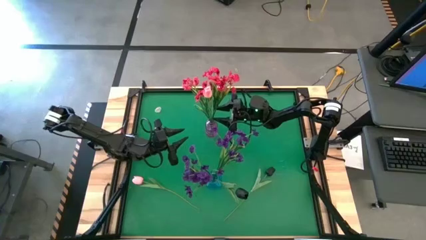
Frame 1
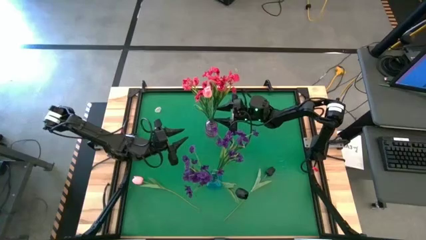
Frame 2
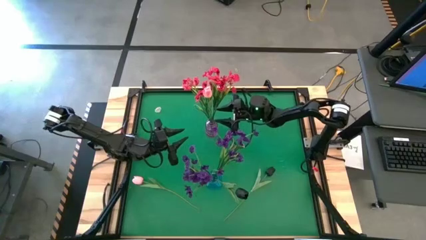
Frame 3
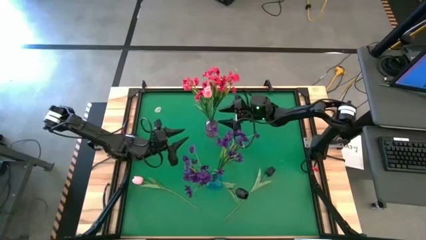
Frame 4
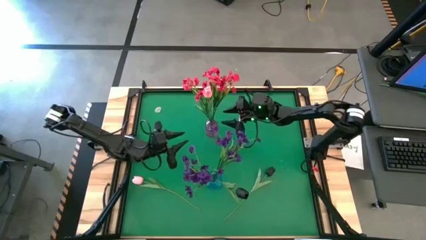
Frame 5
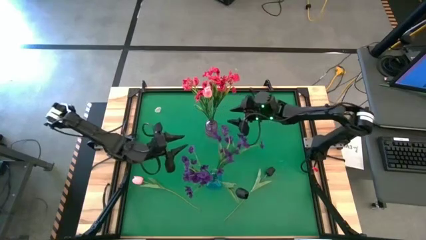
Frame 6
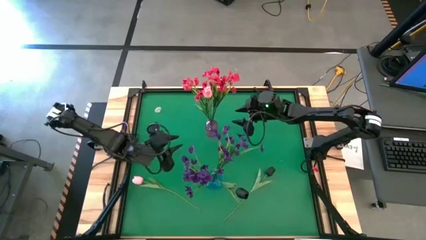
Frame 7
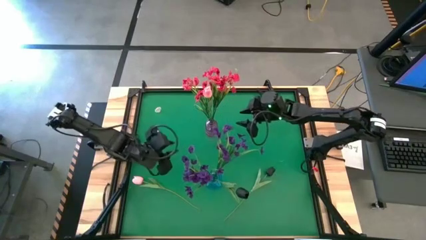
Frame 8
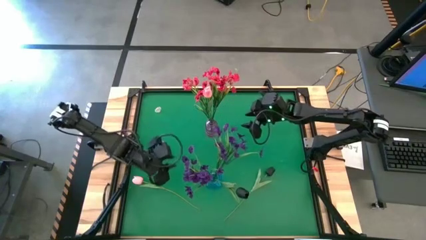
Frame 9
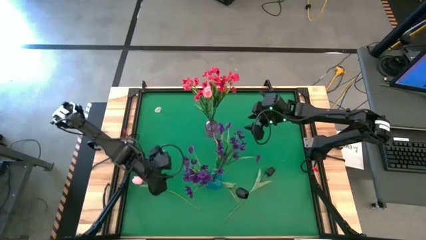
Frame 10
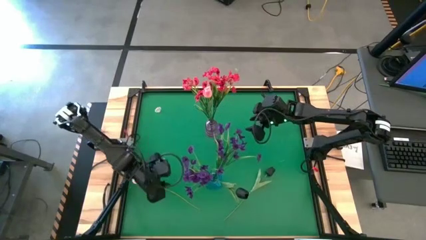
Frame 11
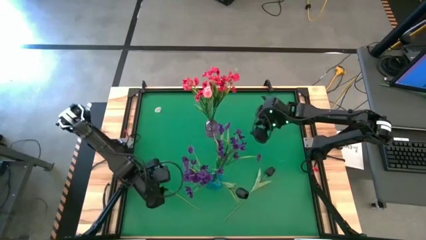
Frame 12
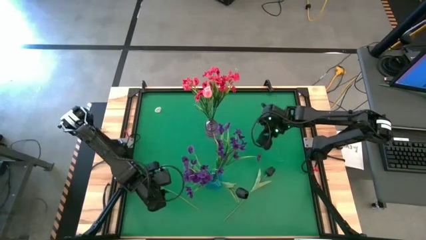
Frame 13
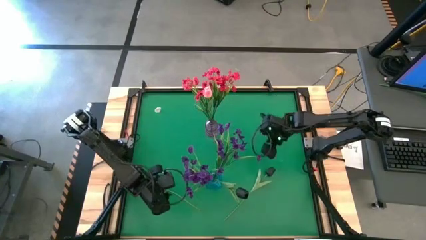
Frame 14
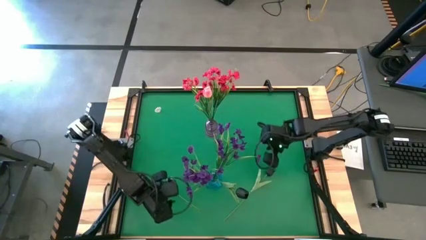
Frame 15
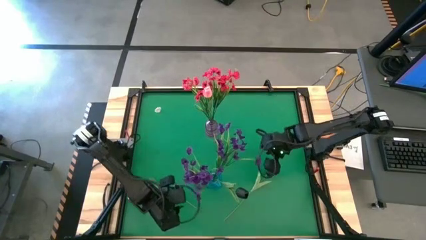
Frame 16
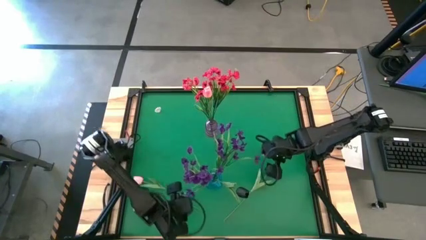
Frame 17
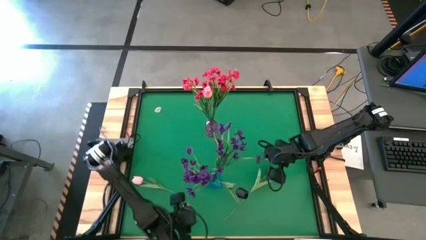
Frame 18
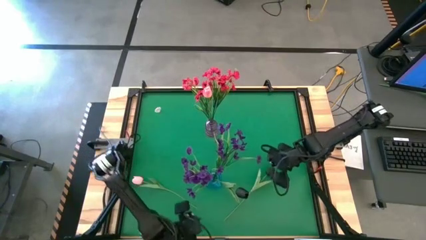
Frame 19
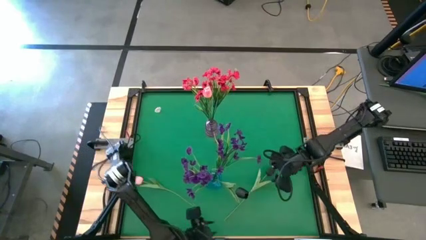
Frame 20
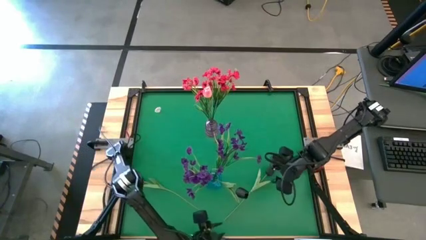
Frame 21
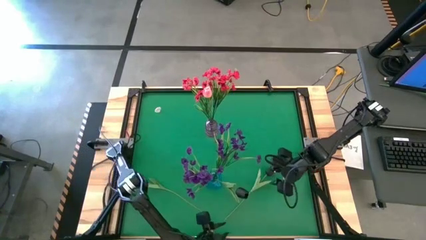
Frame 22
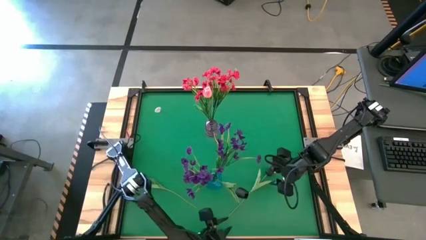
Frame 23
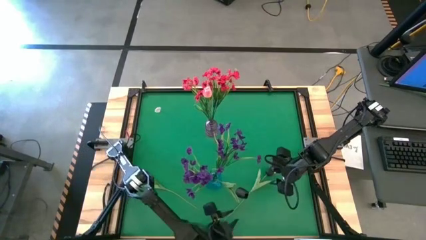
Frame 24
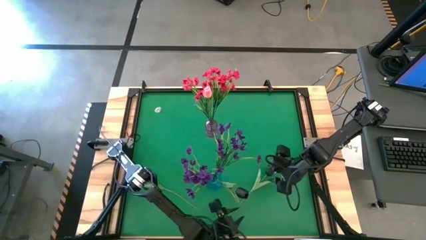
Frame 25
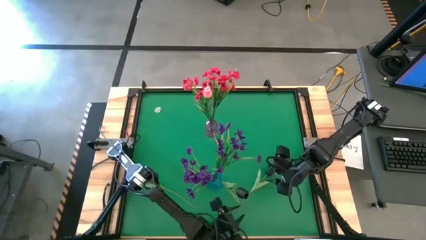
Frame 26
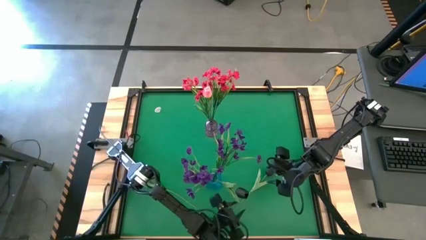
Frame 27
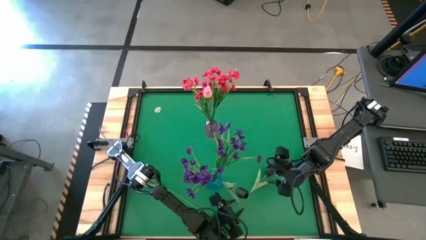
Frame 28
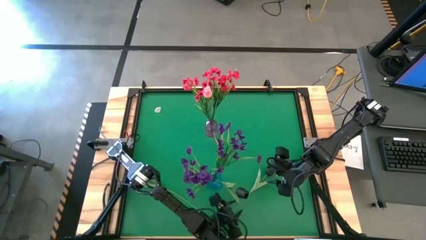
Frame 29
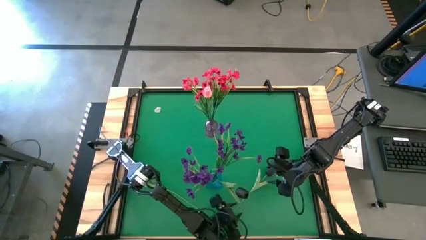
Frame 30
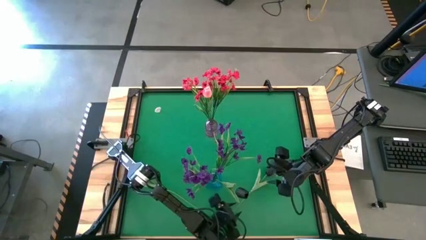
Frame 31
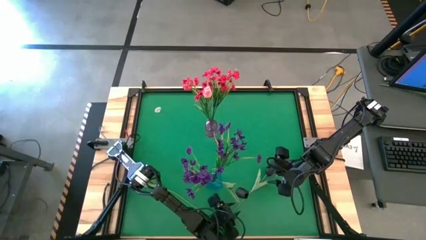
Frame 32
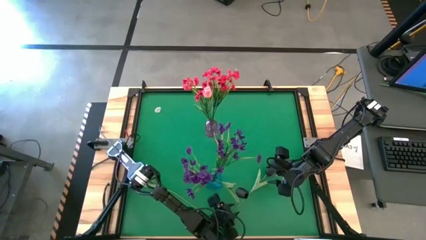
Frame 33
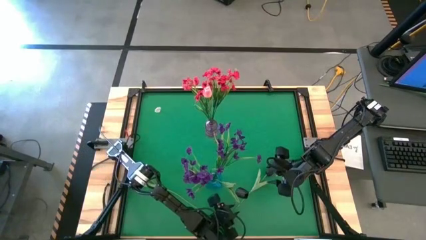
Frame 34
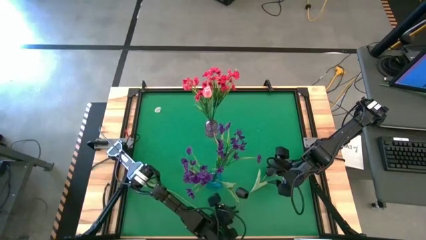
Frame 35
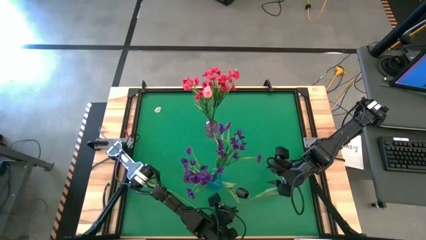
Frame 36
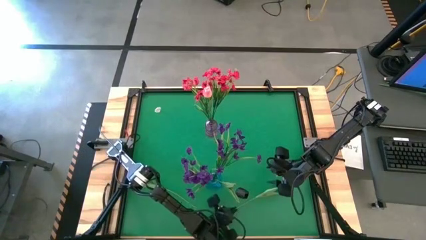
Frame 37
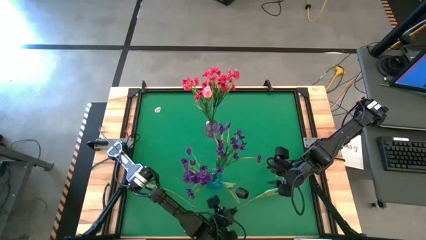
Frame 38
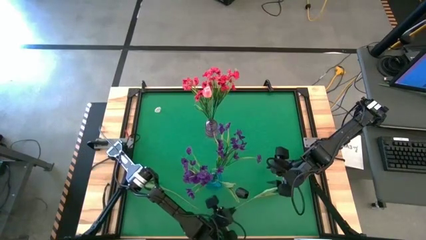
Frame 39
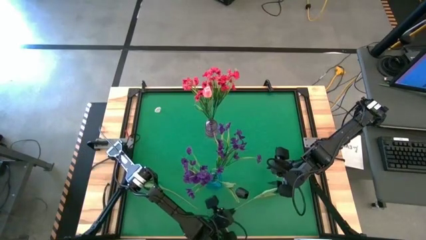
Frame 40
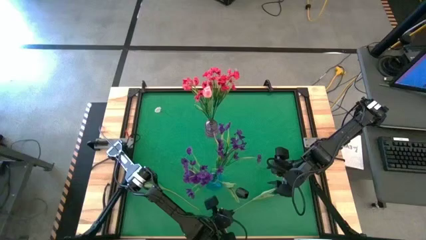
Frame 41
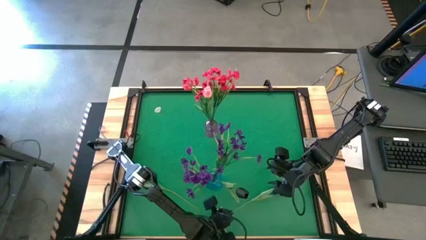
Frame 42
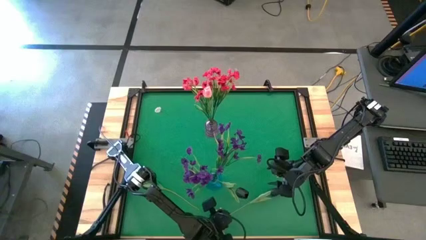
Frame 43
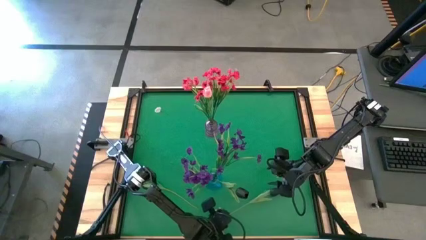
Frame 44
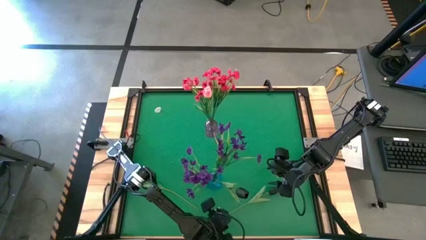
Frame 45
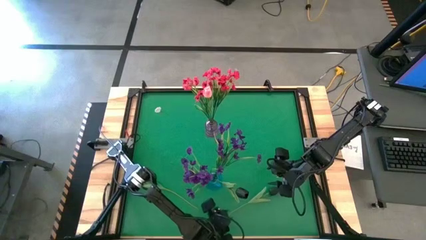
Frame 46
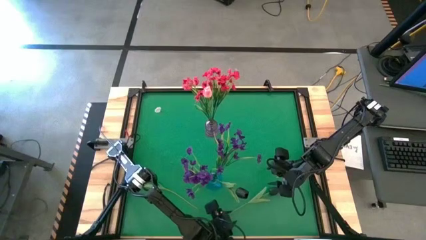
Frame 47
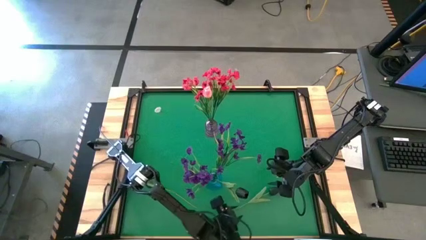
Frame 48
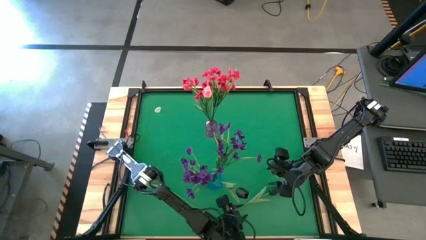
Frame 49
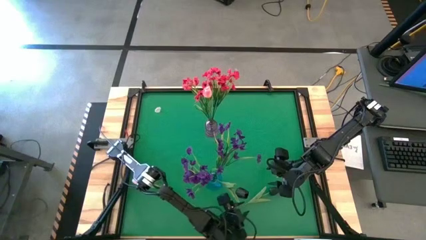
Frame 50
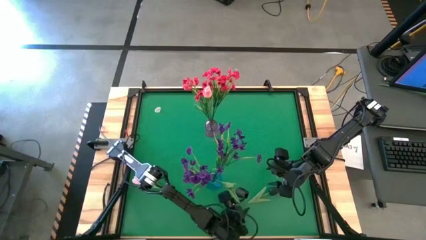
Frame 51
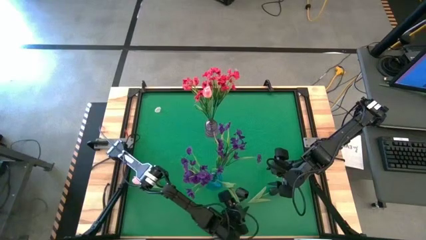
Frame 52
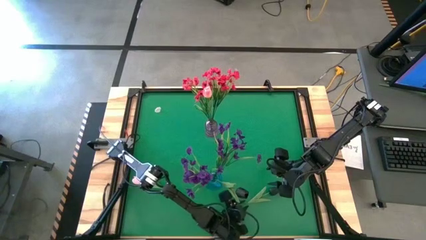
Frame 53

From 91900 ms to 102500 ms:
Task: Sort flowers into vase by color
Put the black tulip into the blue vase
